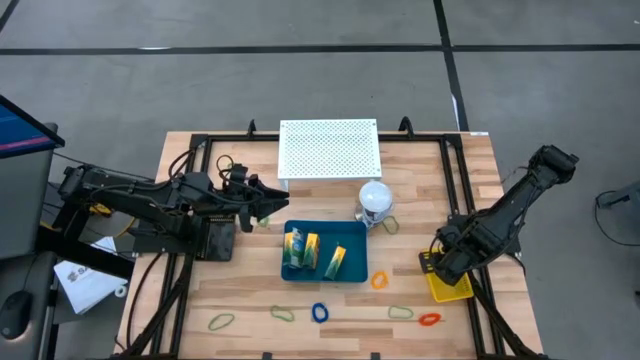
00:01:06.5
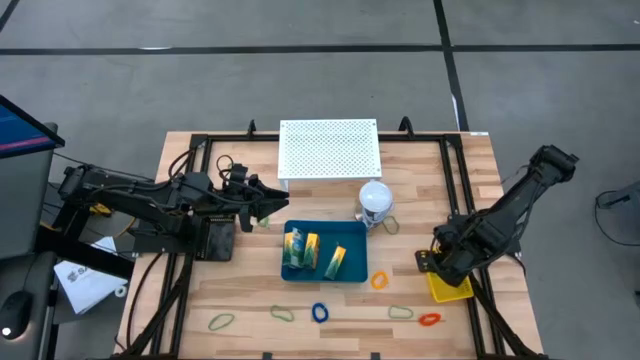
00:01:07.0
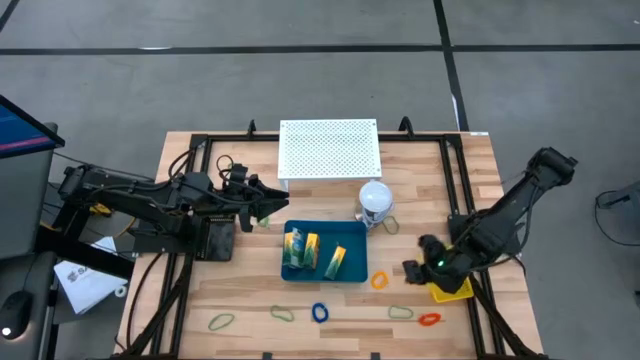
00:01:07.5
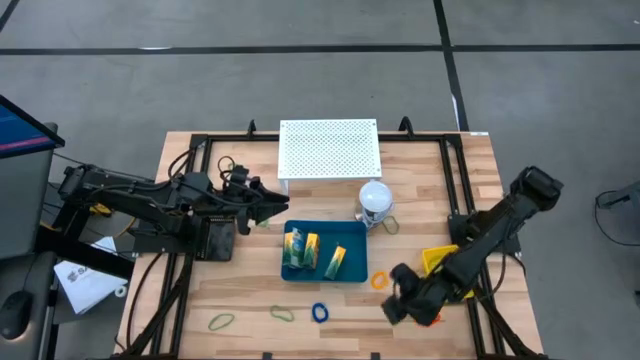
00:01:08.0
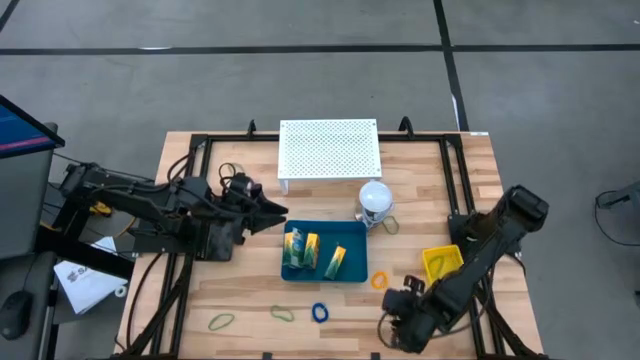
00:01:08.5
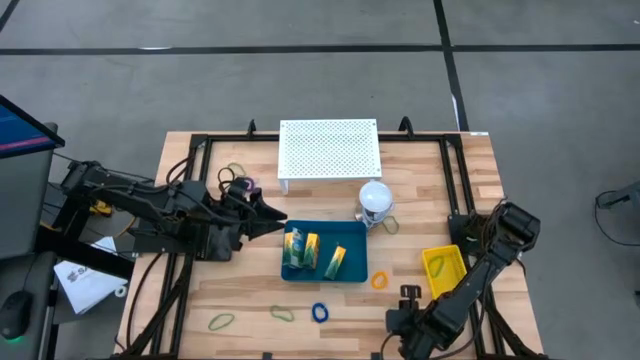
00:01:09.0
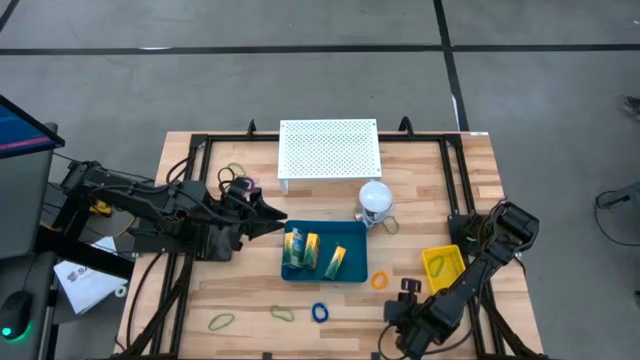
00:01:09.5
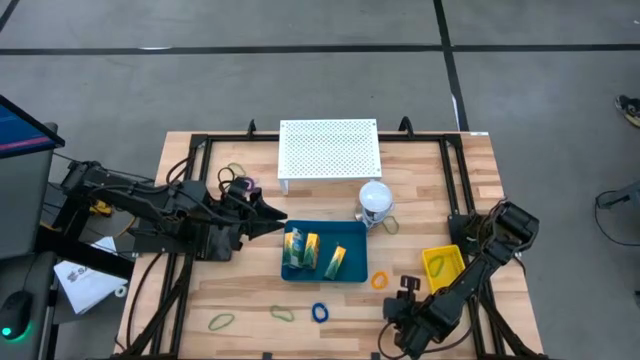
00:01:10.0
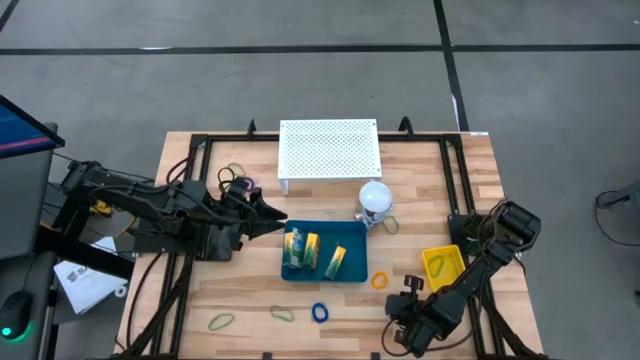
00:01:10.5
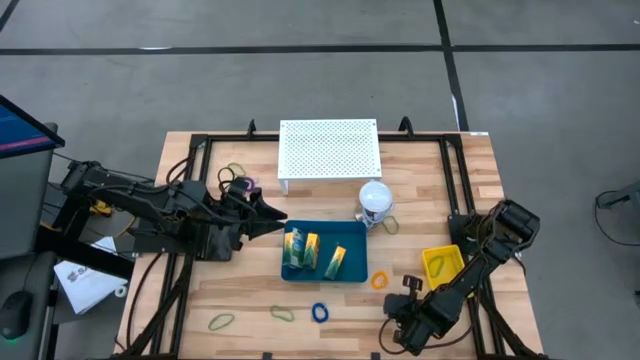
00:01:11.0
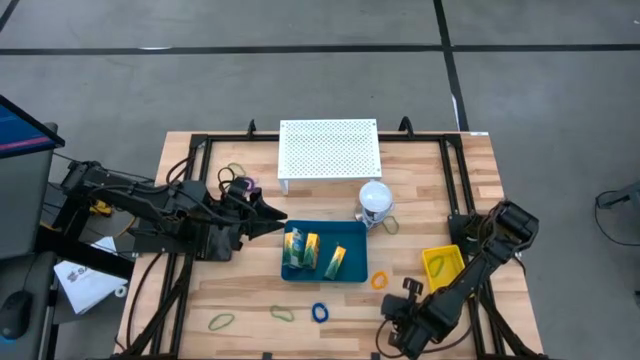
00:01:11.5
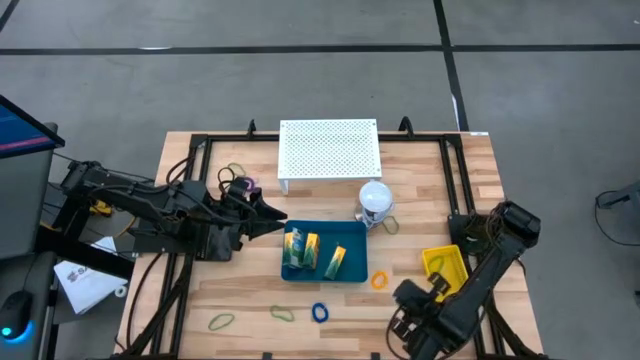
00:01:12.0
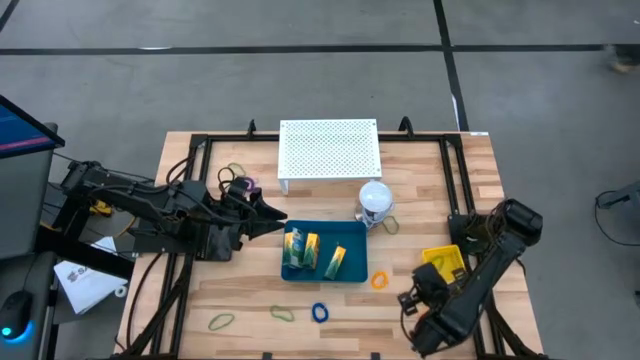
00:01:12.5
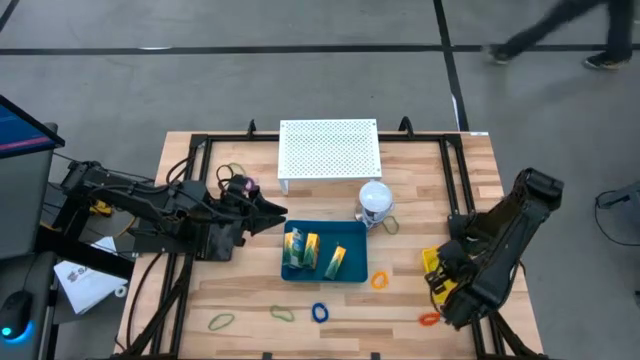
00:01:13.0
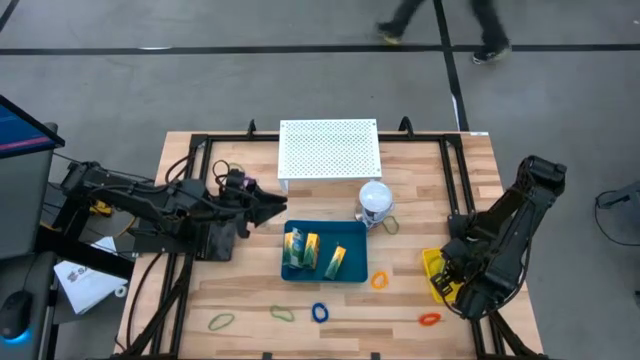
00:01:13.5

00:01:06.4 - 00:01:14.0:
Task: Pick & Place Office Desk Supplies
Put the green rubber band into the yellow bin

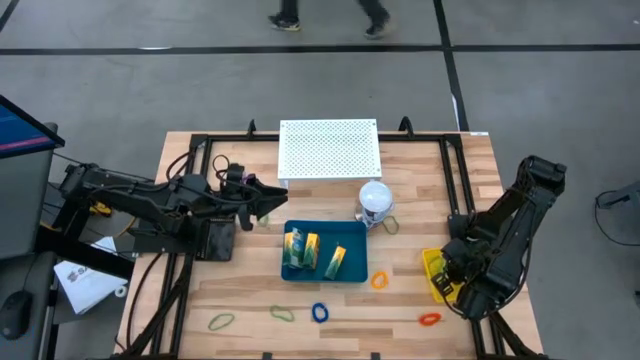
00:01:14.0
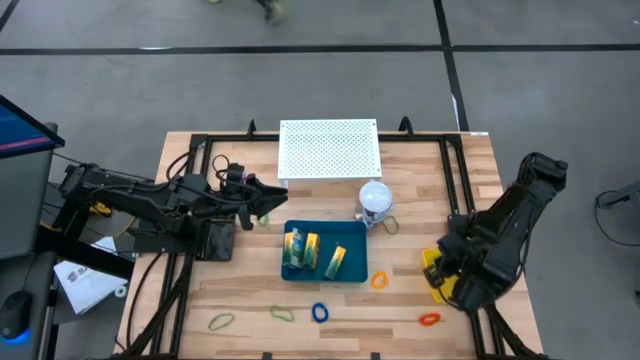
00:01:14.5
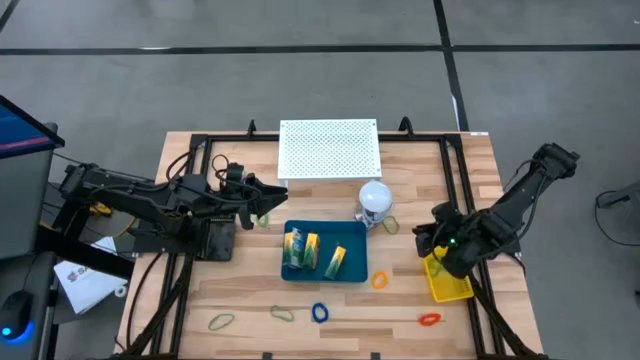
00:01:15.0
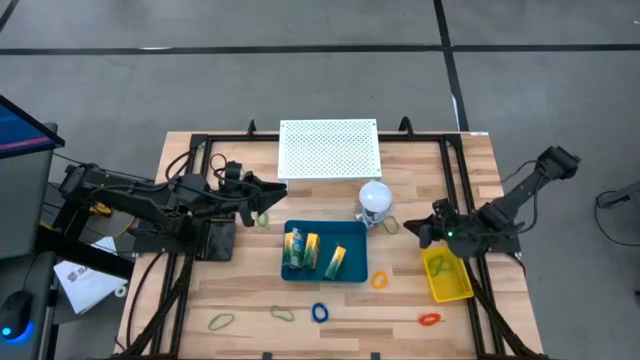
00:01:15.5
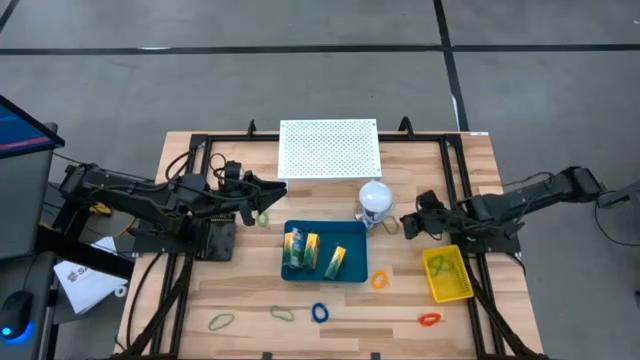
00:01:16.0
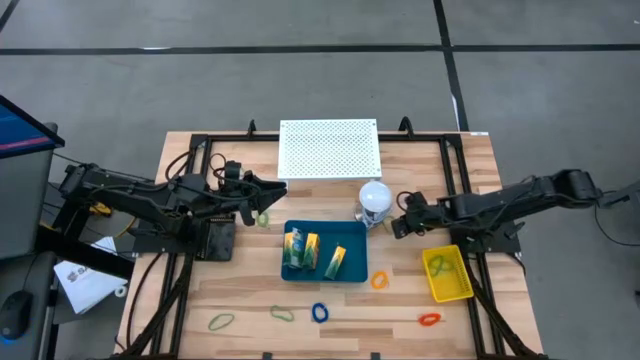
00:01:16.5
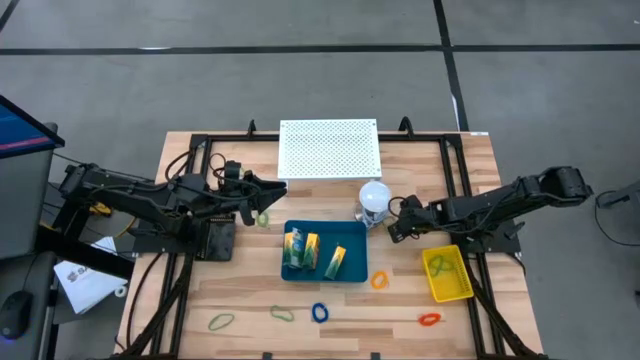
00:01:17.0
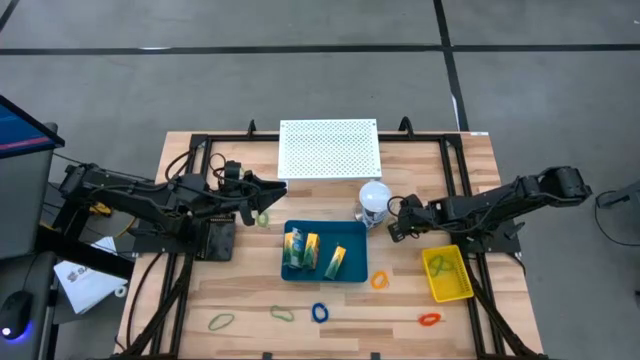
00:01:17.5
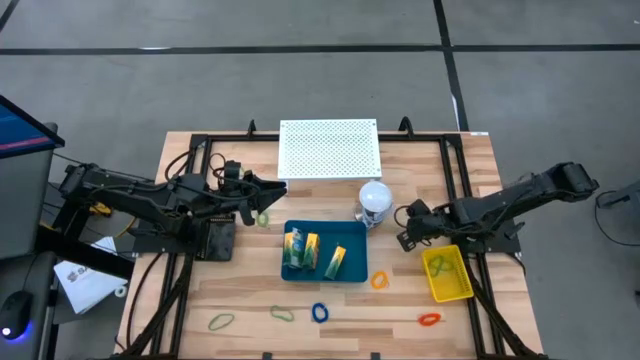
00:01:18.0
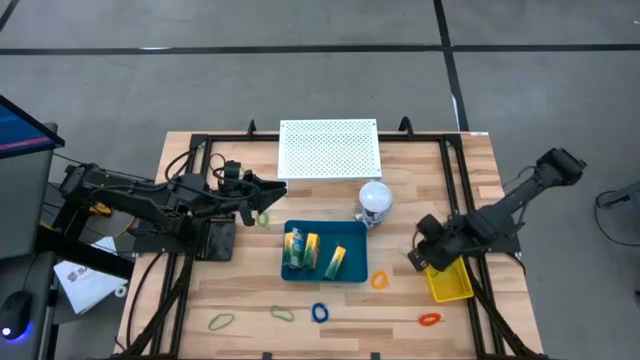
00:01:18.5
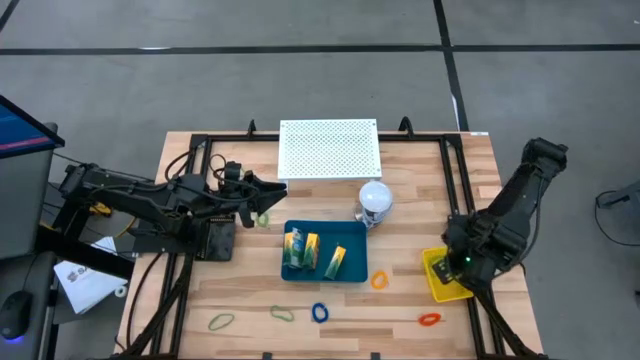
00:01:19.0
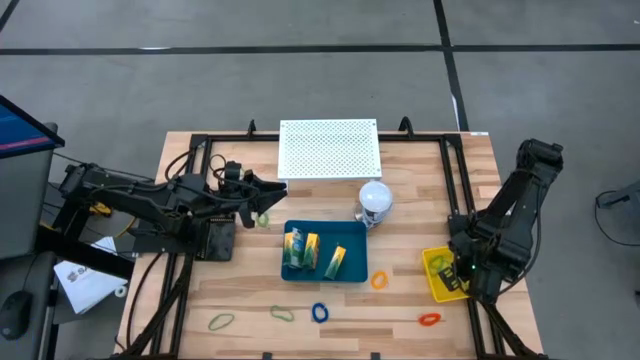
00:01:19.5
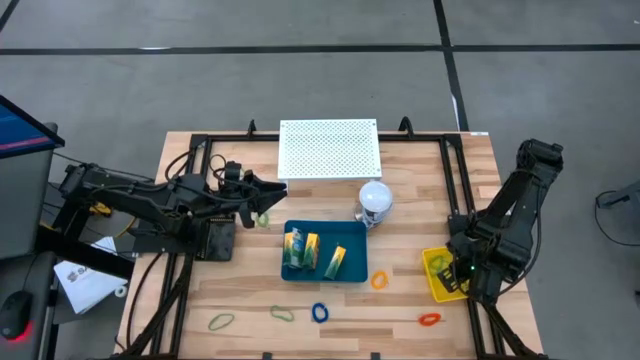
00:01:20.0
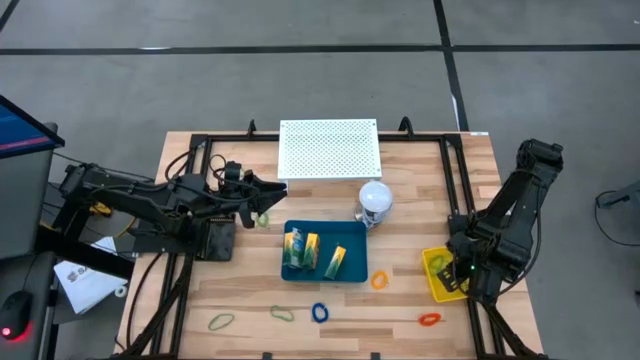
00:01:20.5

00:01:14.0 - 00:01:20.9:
Put the green rubber band into the yellow bin

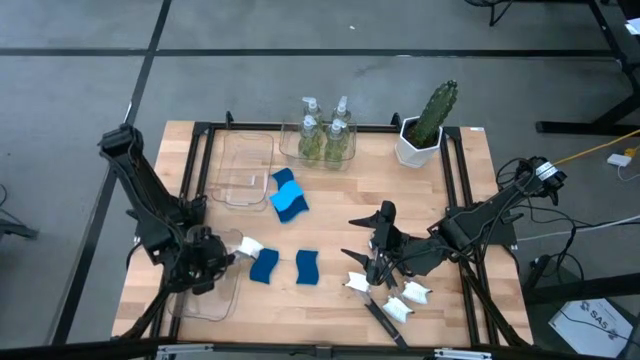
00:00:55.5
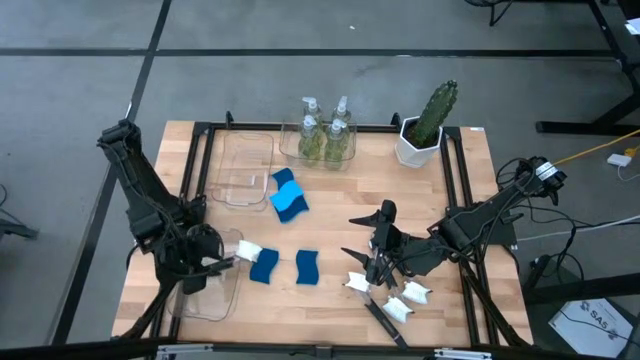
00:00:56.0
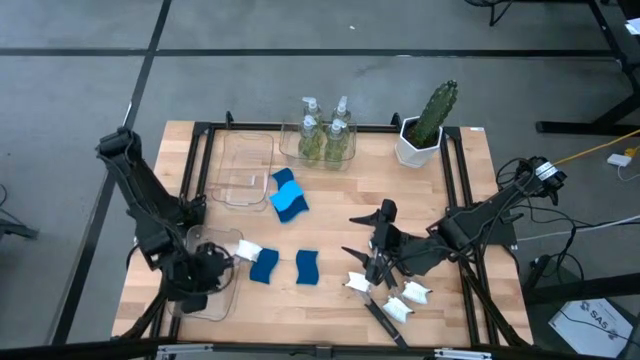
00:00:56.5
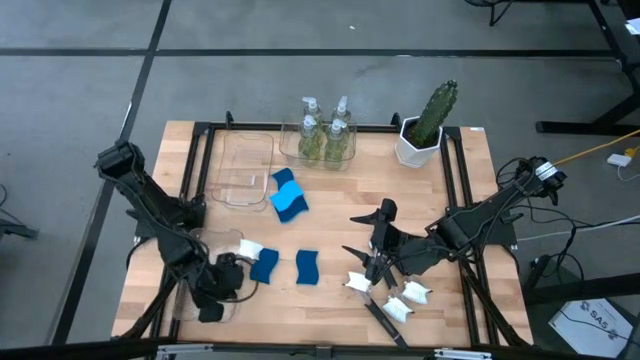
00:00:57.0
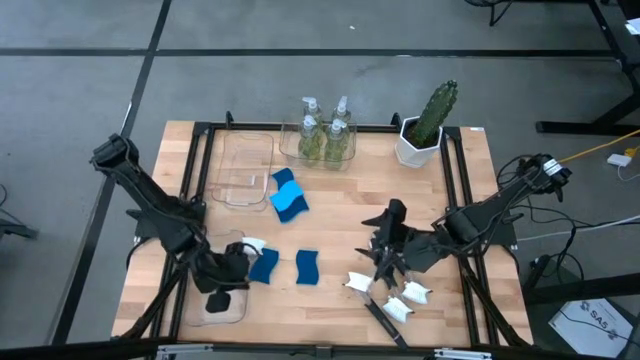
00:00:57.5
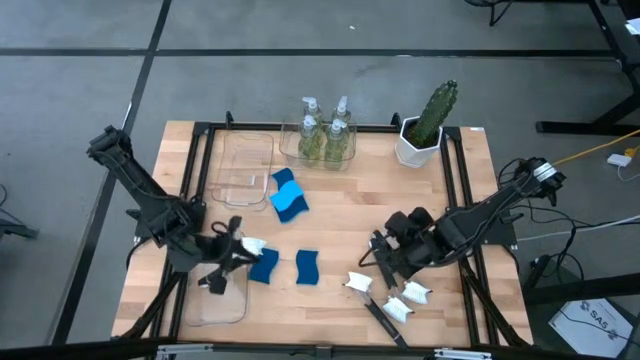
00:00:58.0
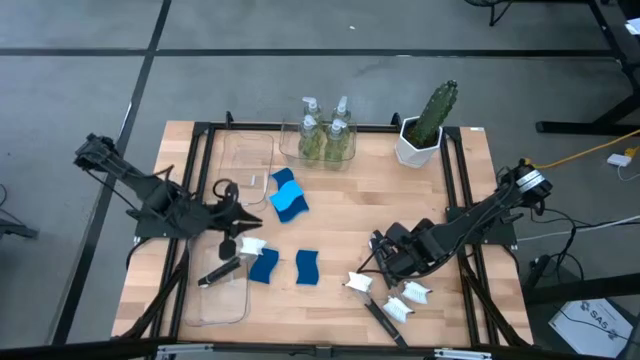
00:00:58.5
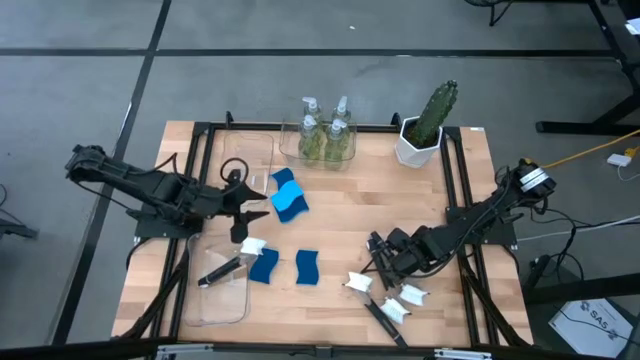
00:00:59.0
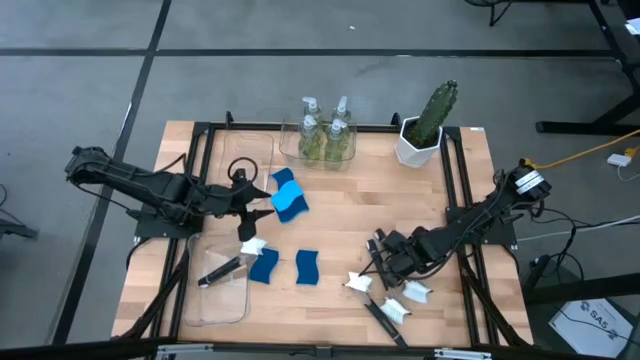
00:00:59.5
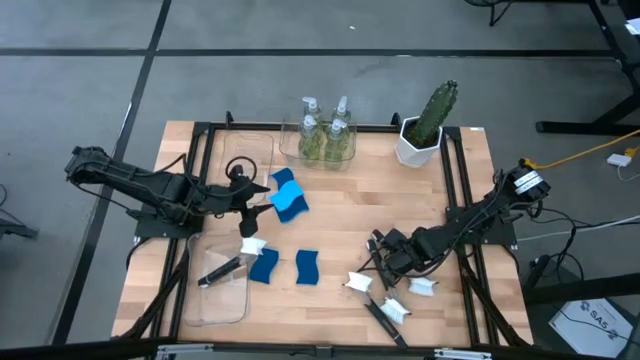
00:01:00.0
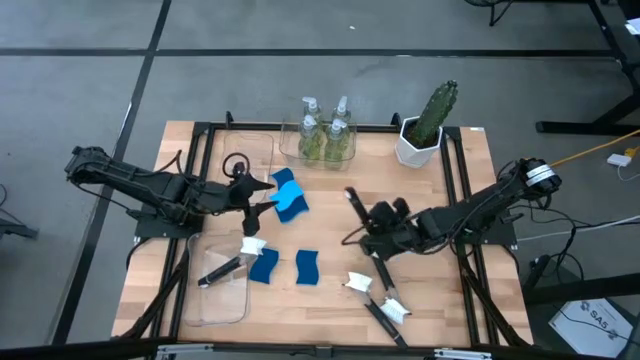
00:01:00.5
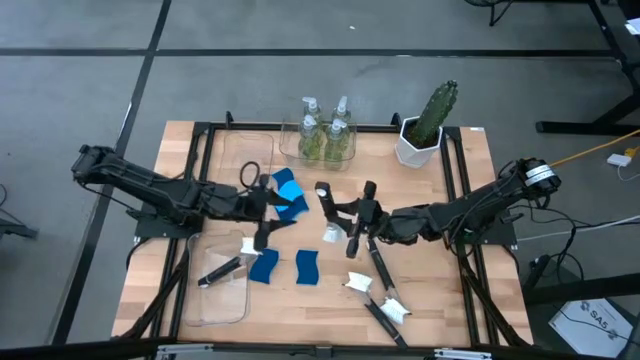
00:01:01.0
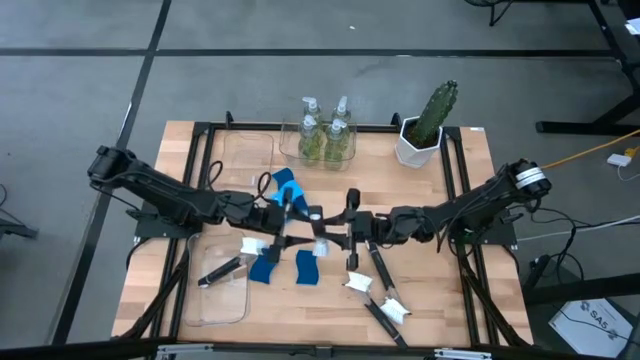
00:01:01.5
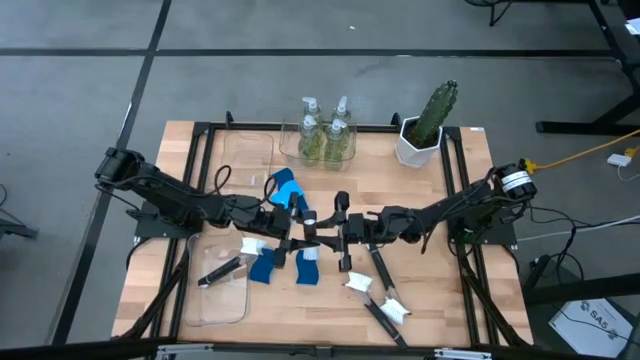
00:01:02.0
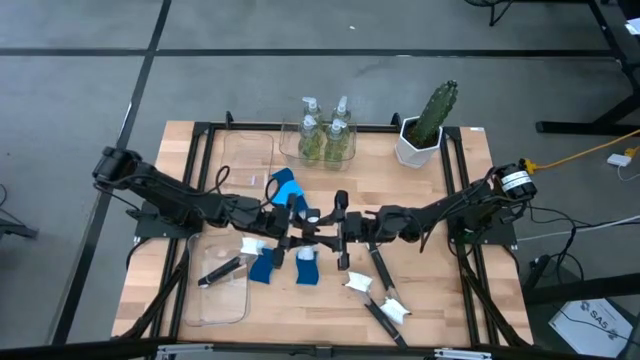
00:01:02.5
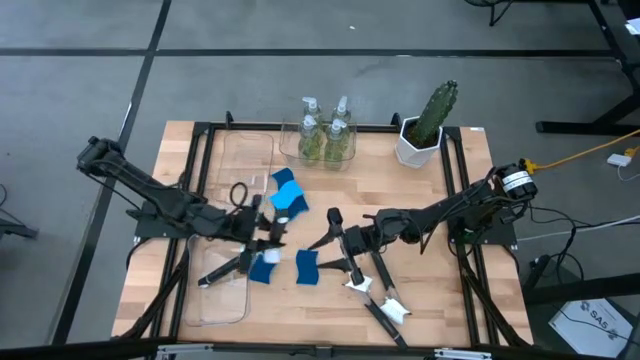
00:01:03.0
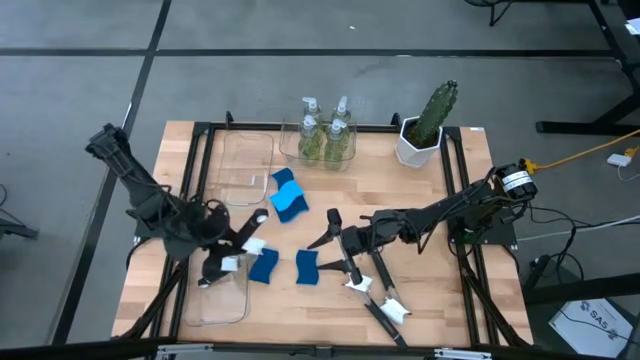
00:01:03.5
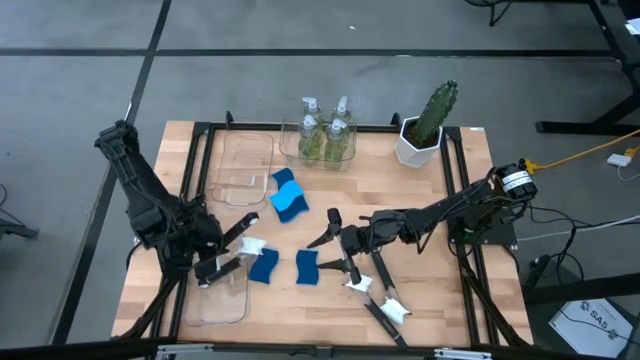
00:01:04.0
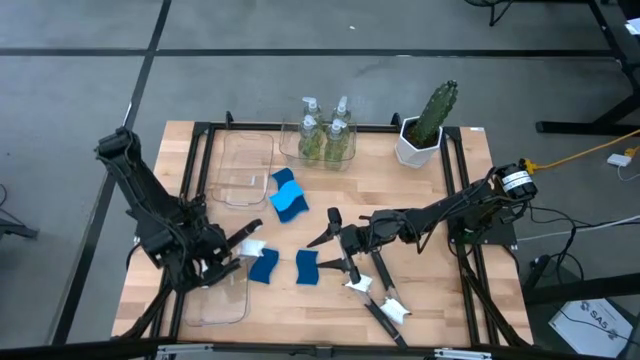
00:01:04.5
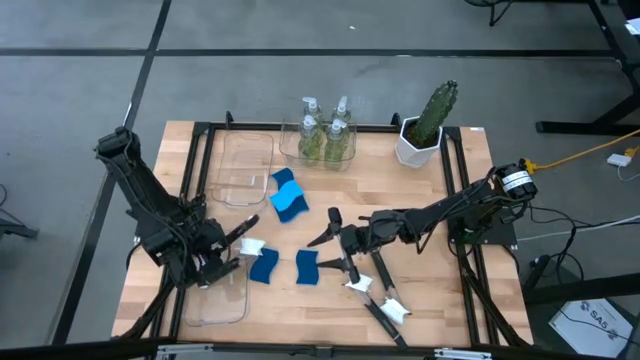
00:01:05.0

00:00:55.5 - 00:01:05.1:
Task: Pick & Place Kitchen Sink Supplies
Put the black dish brush into the bottom left transparent bin
